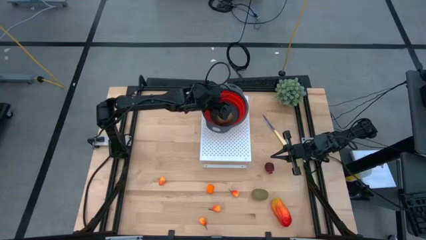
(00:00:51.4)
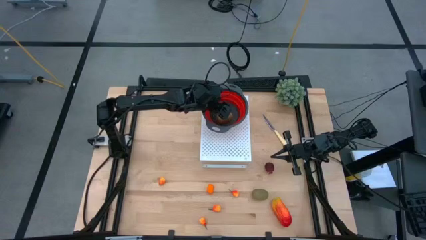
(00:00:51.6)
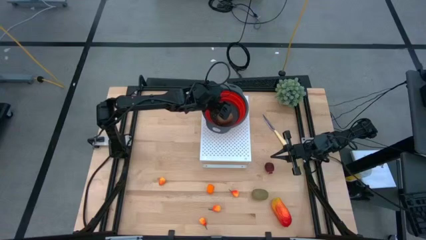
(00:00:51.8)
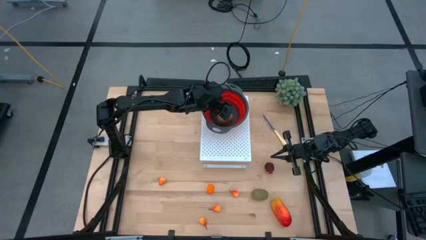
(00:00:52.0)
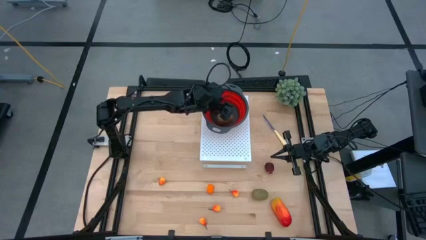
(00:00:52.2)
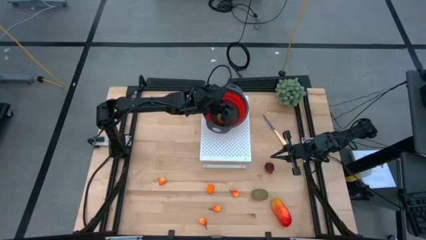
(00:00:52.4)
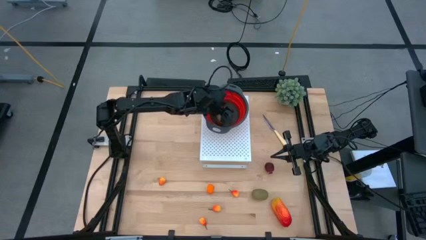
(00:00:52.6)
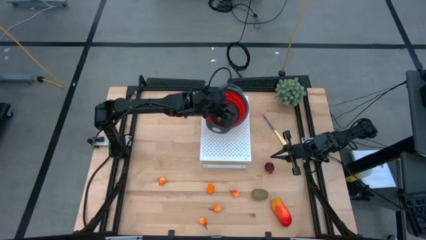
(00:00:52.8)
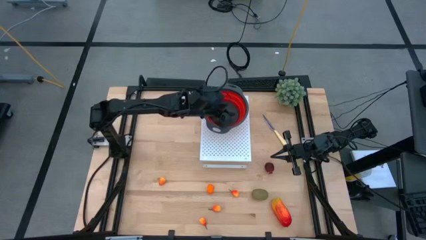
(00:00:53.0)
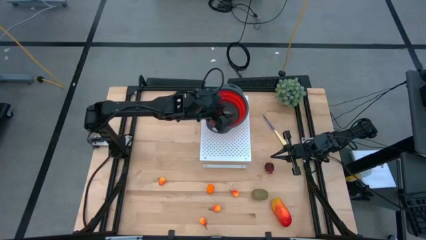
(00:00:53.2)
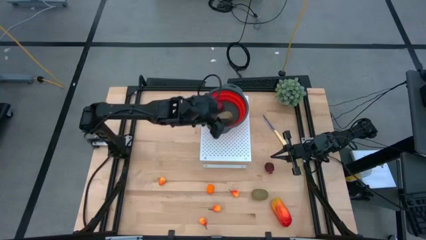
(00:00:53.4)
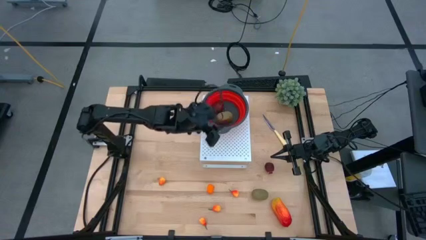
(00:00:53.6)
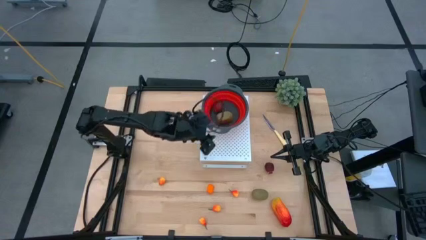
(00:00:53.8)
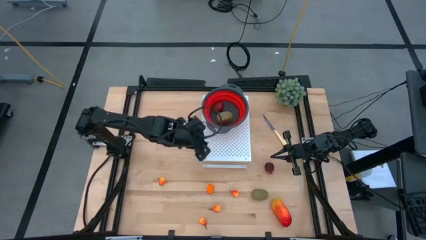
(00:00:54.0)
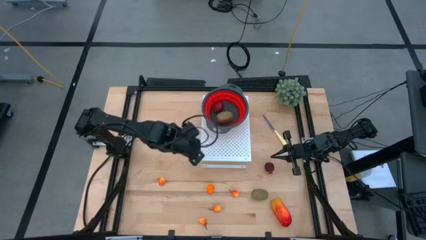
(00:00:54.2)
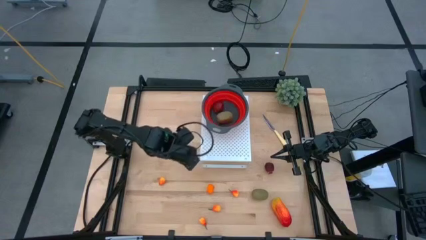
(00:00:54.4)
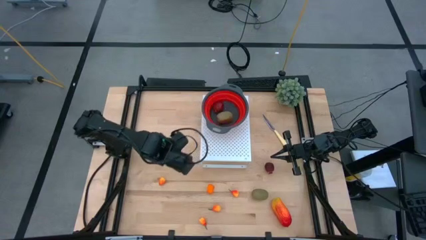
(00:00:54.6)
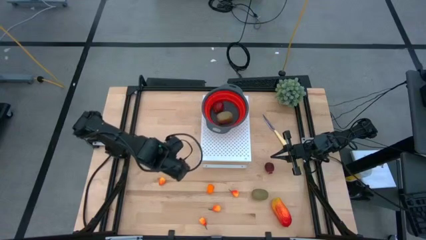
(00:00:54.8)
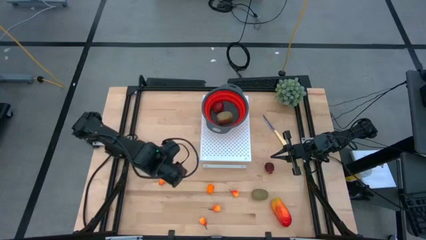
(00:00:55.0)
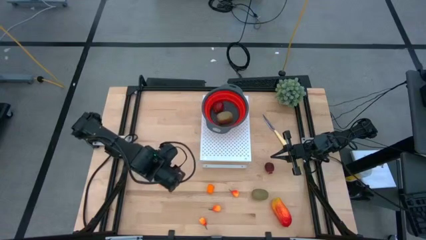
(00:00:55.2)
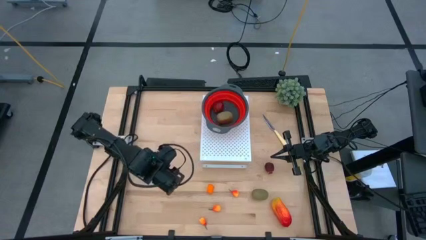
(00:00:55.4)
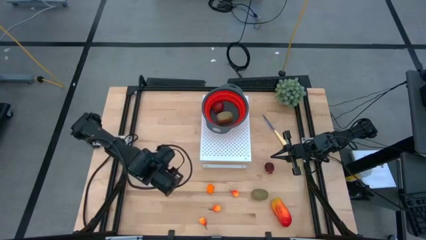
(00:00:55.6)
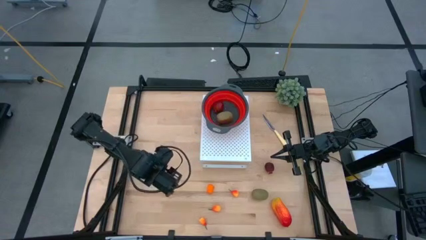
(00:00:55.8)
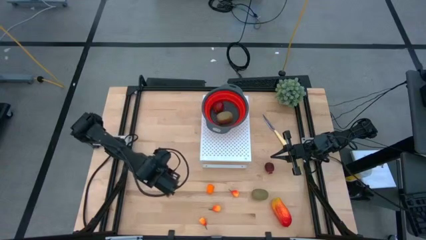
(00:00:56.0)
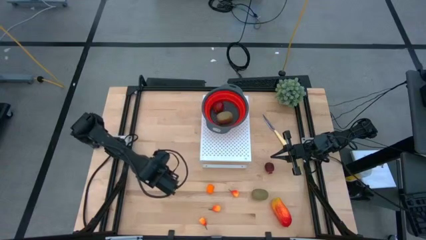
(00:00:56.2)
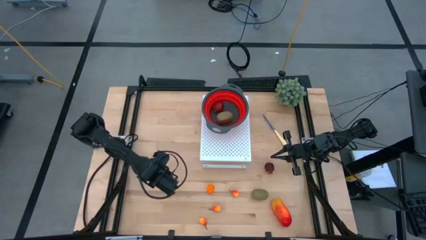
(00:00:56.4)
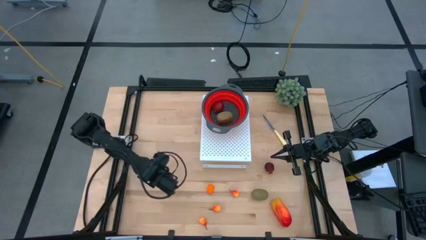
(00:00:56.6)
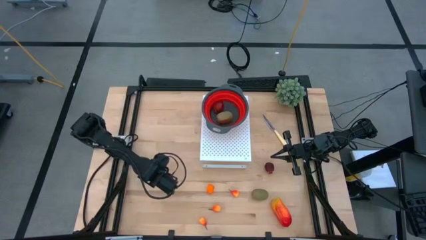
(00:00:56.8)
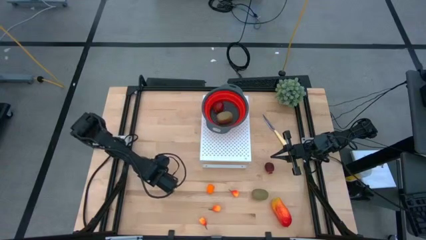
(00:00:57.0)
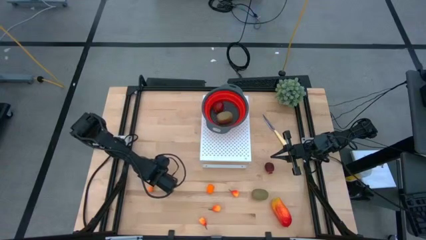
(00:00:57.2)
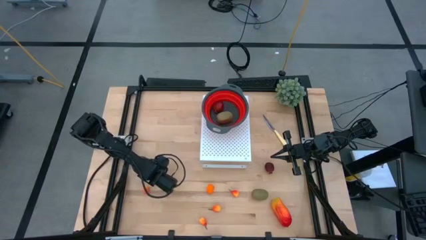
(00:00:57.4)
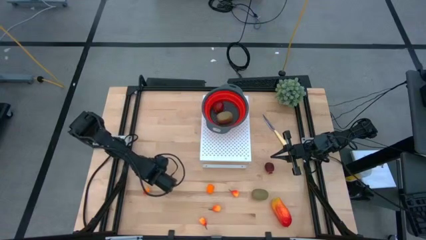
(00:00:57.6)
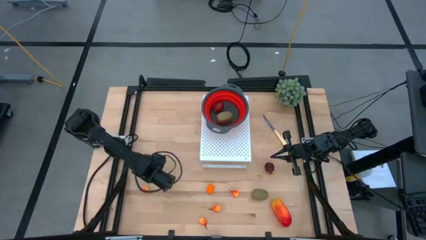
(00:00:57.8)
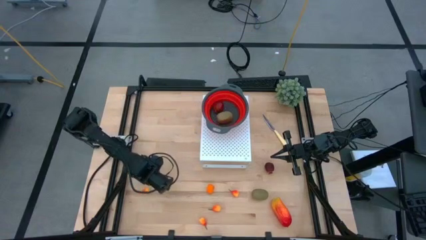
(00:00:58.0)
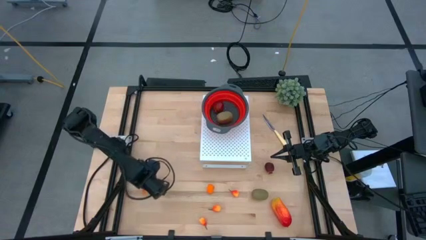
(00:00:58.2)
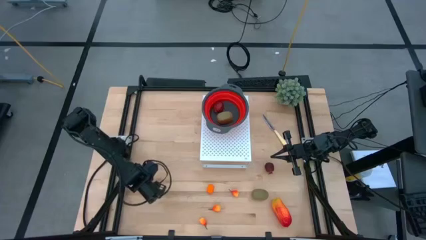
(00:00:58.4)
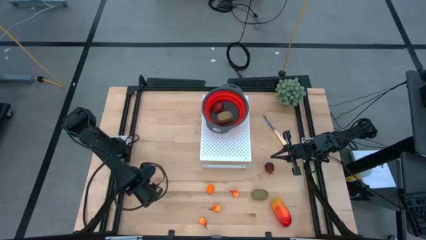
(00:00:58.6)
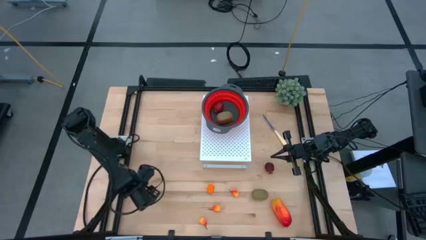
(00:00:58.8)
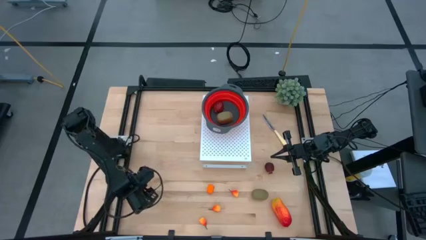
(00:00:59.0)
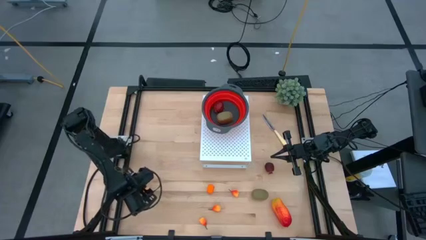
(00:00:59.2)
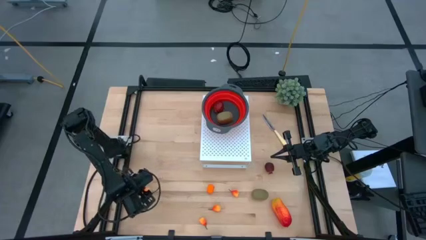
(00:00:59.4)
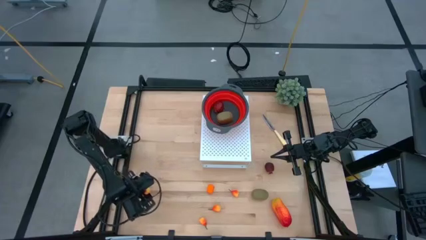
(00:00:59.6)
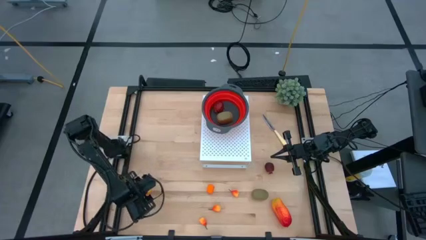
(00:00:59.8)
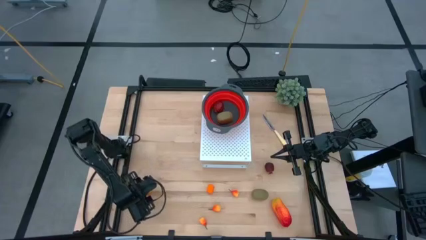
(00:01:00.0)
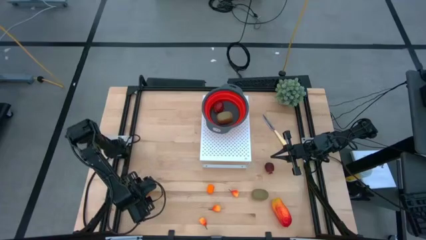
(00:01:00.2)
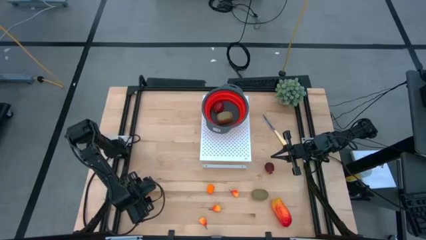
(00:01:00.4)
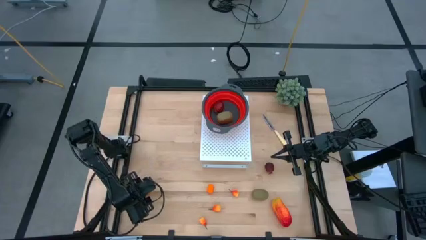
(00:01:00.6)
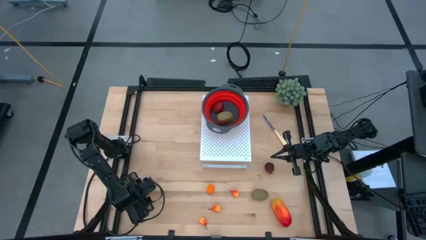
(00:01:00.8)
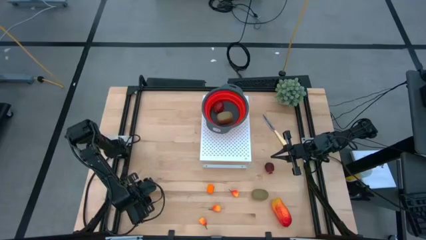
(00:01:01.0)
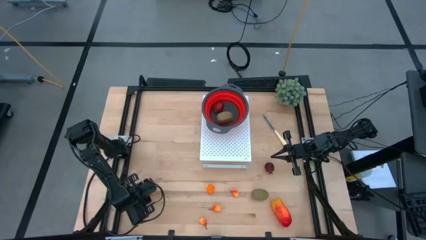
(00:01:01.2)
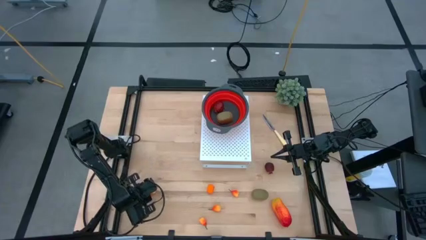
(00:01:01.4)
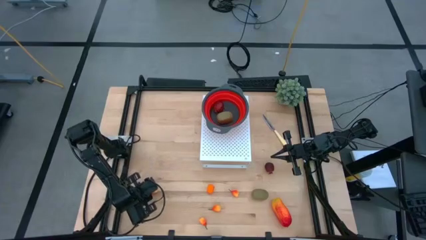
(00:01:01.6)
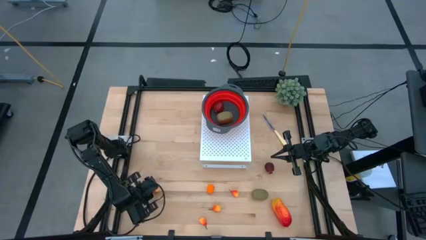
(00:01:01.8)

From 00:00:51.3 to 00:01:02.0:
Task: Pick & Place Fruit
Put the orange pear into the red strainer bowl
